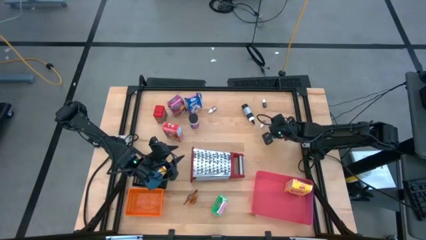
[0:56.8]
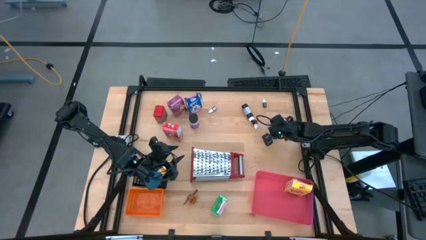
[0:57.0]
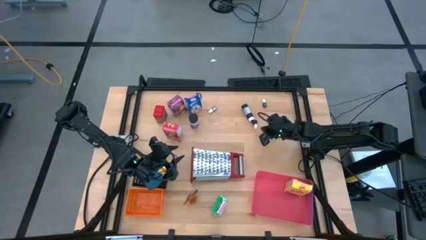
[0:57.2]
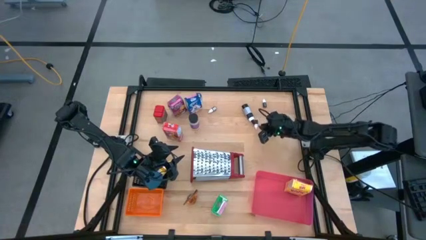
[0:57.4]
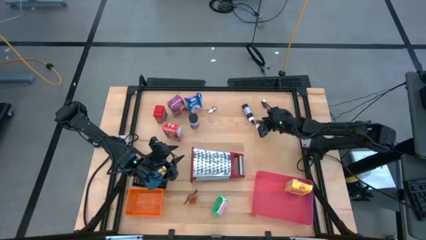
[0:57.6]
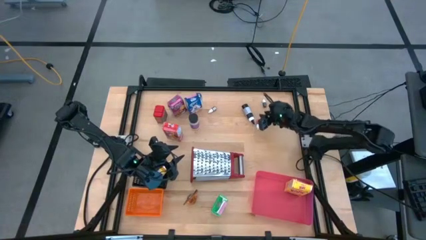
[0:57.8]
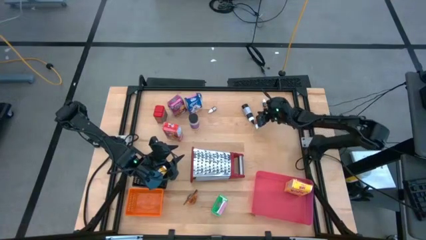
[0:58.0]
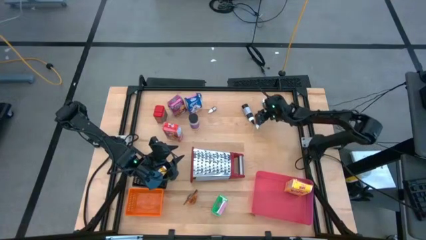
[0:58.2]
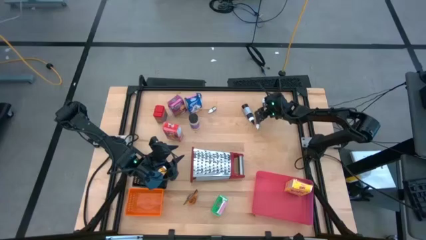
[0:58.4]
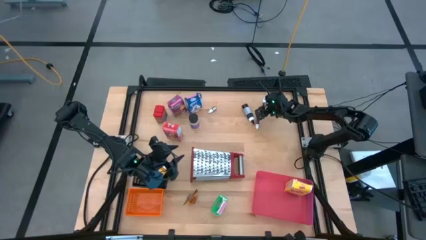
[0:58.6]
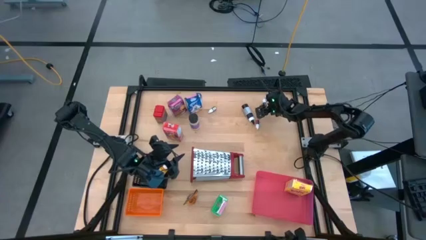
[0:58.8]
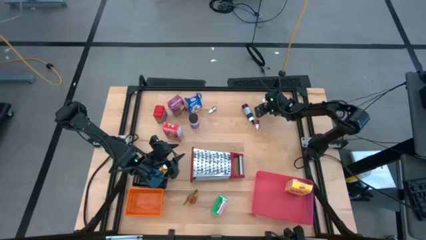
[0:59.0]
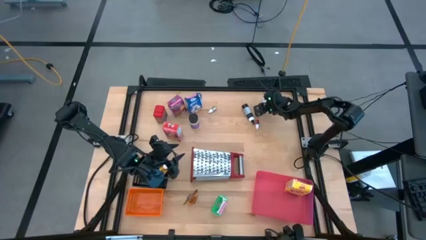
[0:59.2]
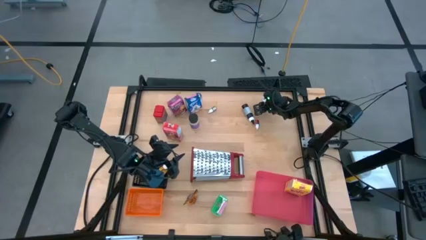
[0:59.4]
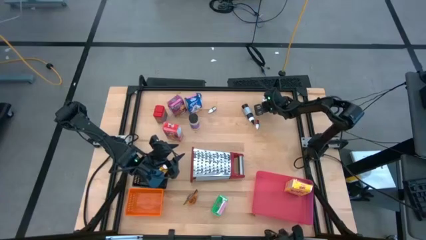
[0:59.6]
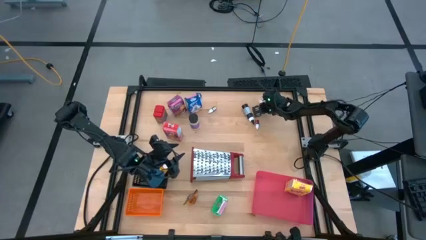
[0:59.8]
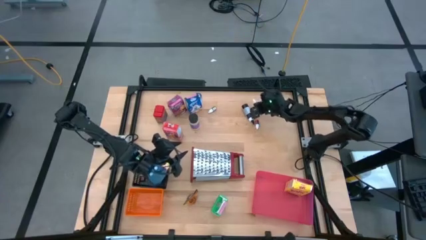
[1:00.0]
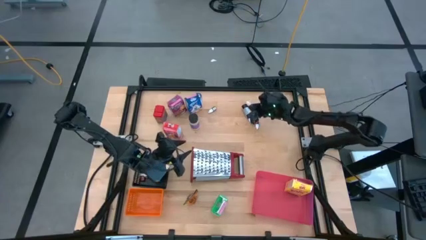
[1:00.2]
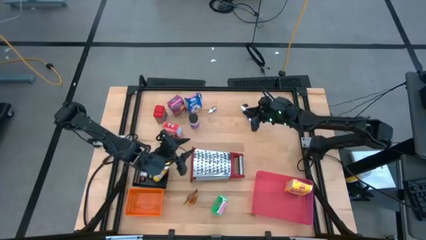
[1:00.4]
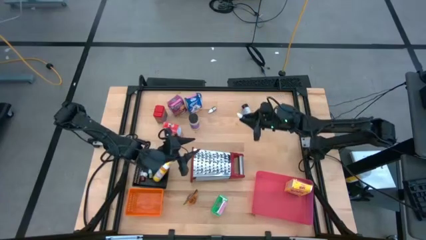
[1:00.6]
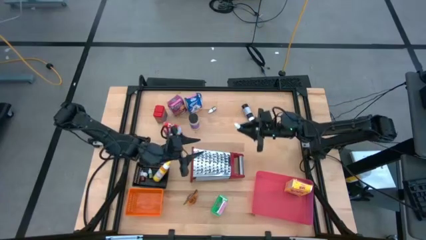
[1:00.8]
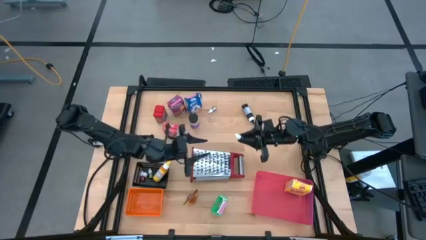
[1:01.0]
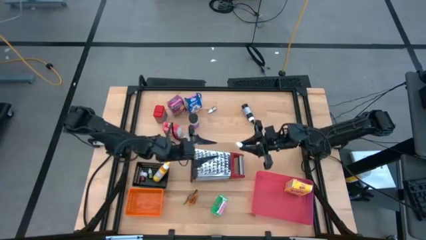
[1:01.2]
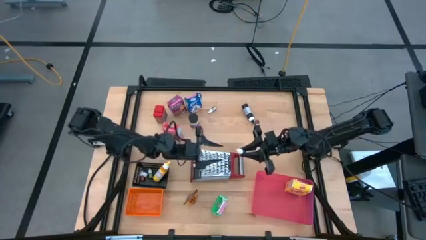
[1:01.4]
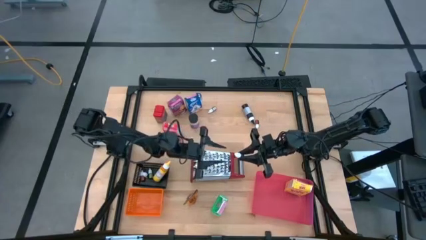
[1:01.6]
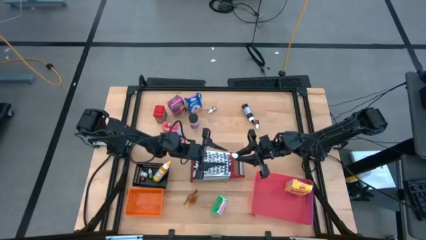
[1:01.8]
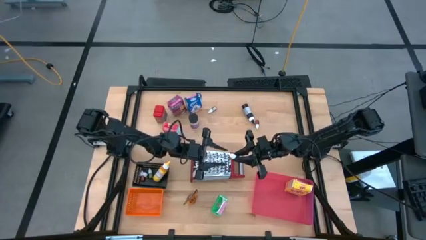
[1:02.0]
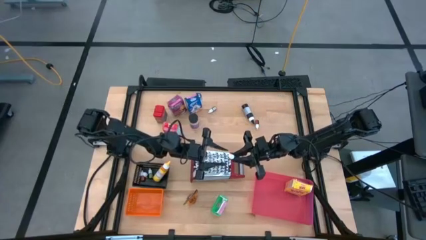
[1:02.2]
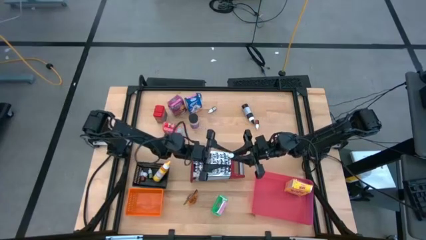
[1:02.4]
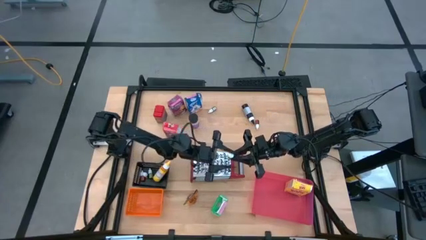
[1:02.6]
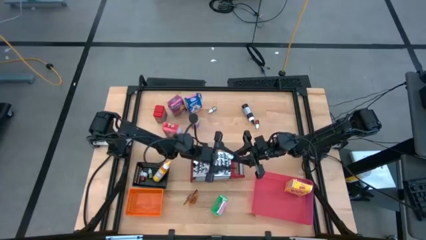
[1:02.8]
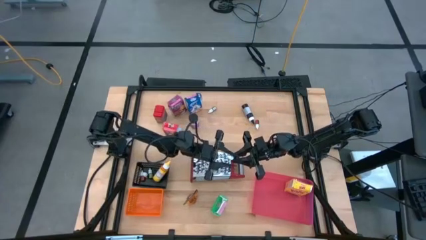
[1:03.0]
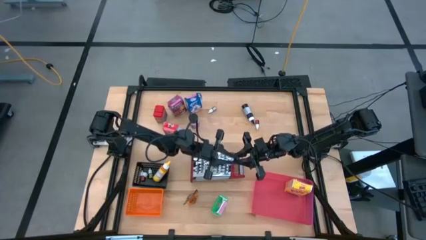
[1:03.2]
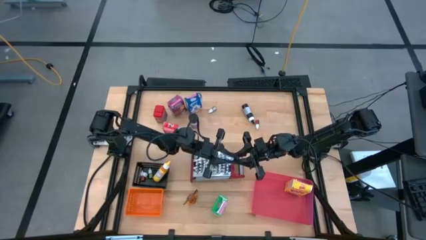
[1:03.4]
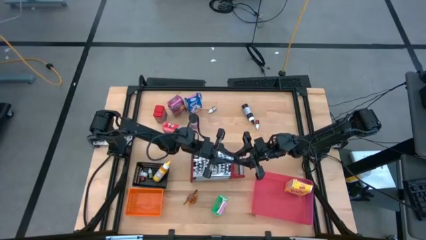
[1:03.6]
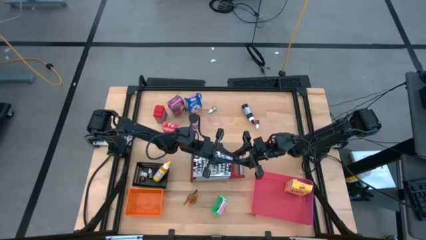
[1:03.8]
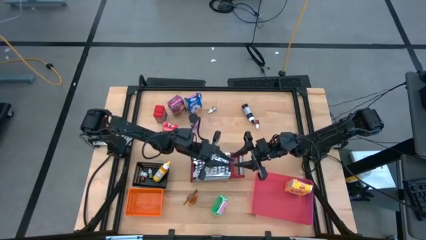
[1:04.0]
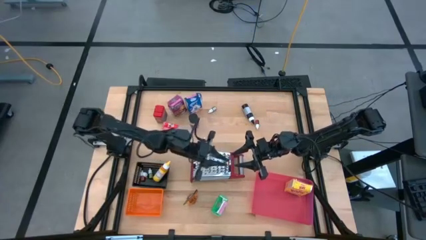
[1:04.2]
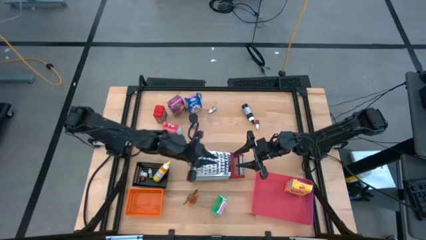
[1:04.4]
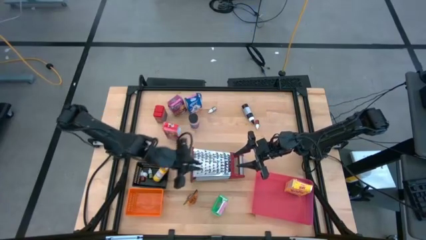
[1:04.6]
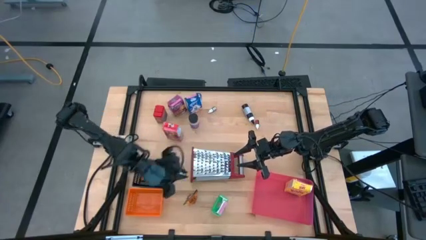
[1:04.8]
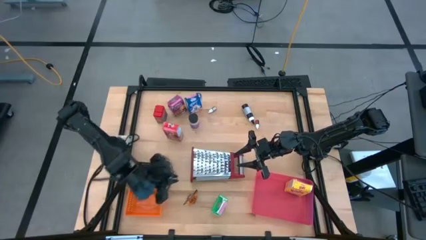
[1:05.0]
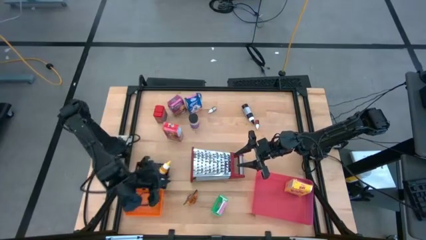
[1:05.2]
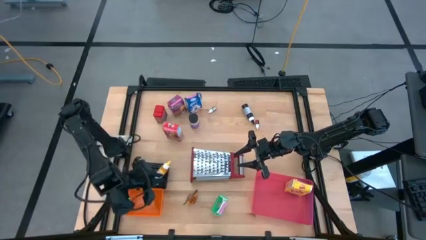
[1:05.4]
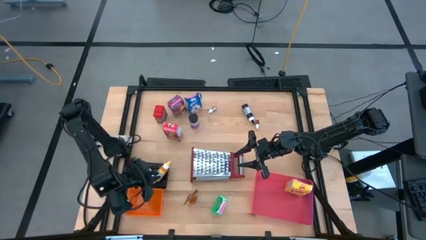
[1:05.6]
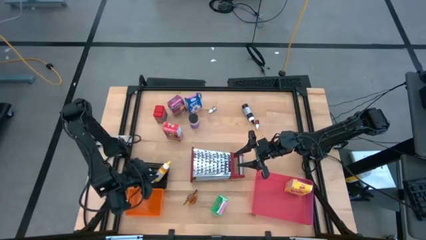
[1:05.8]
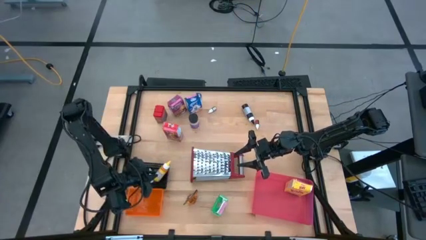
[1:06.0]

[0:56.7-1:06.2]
Task: Pick & Place Kitchen Items
Put the small brown food coloring bottle into the black bin

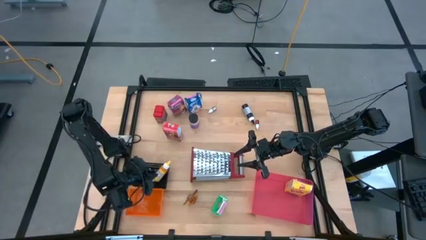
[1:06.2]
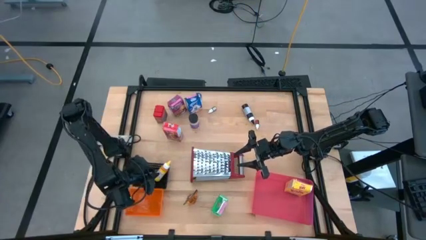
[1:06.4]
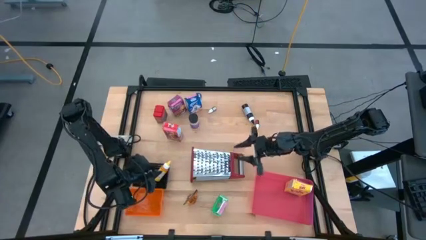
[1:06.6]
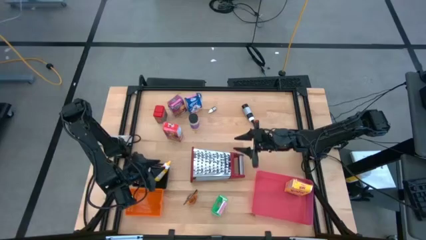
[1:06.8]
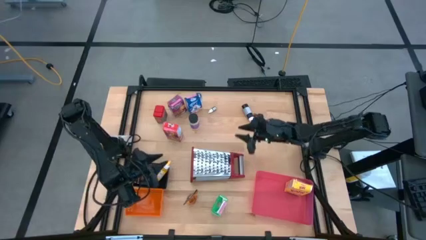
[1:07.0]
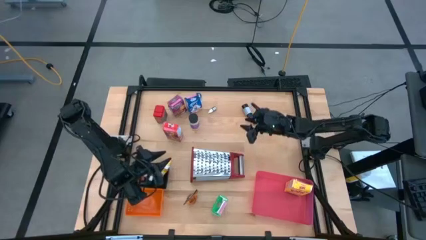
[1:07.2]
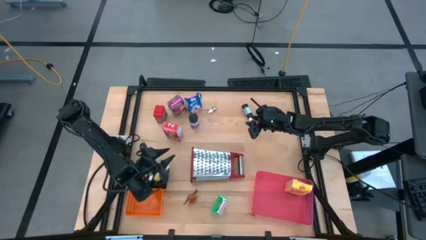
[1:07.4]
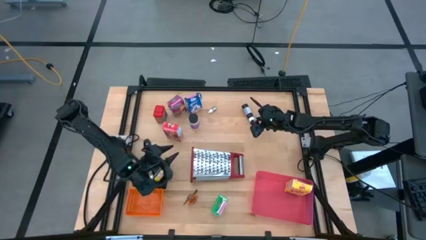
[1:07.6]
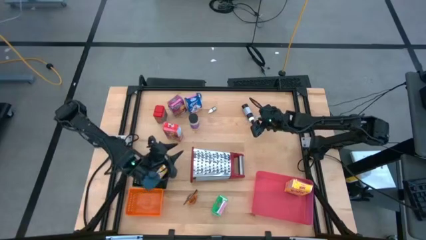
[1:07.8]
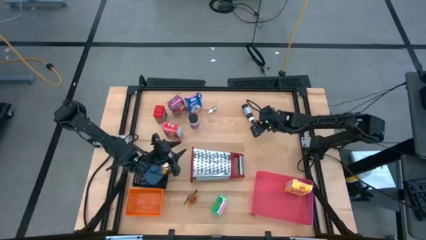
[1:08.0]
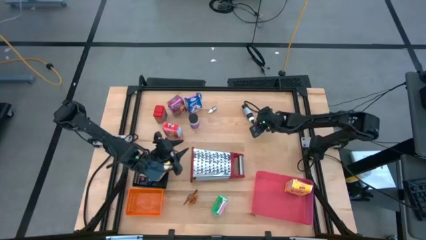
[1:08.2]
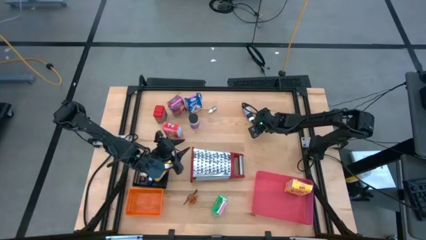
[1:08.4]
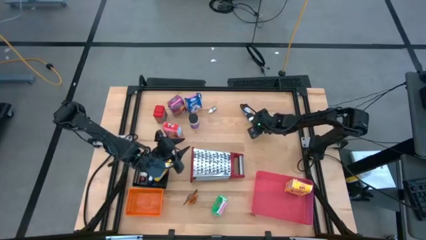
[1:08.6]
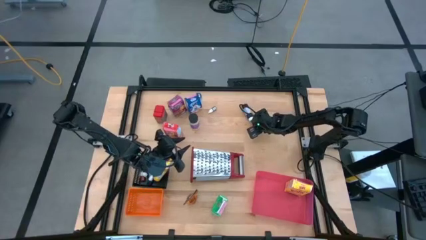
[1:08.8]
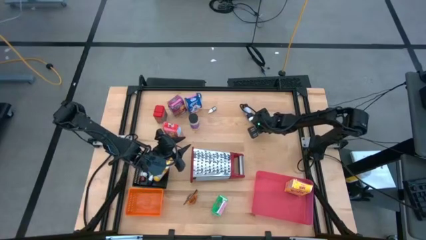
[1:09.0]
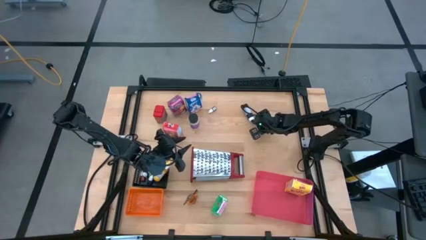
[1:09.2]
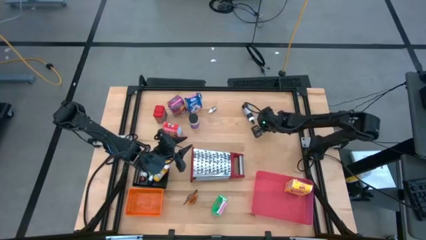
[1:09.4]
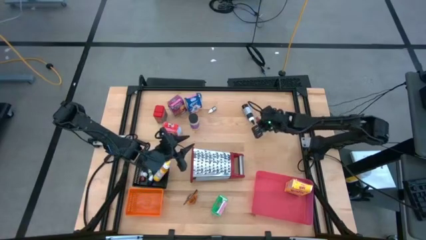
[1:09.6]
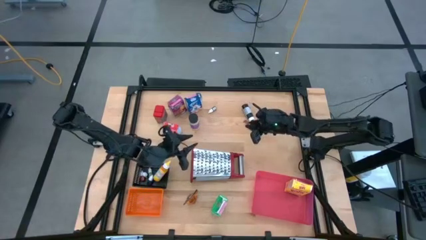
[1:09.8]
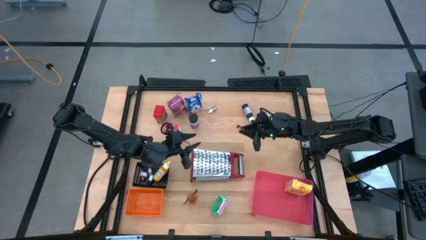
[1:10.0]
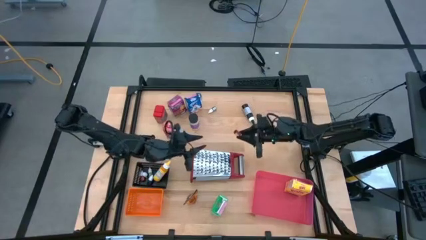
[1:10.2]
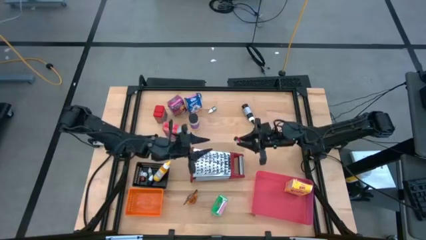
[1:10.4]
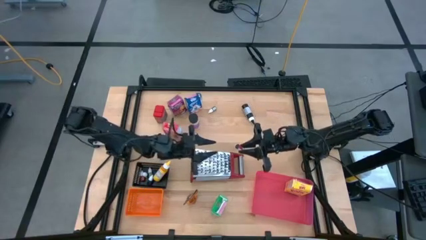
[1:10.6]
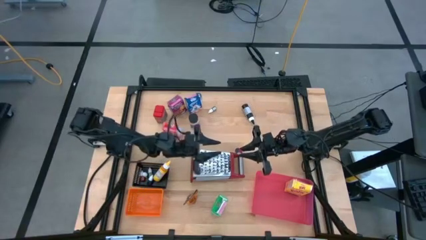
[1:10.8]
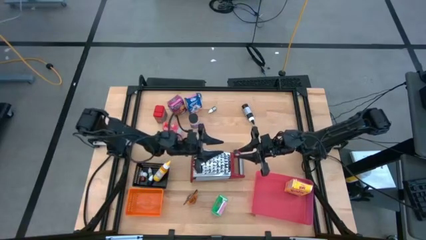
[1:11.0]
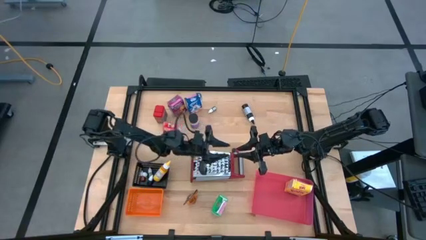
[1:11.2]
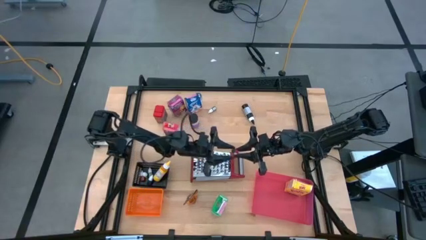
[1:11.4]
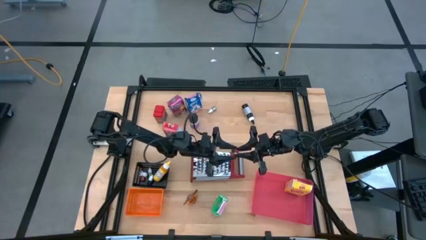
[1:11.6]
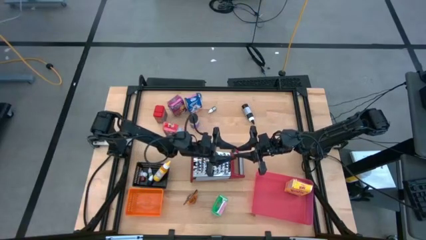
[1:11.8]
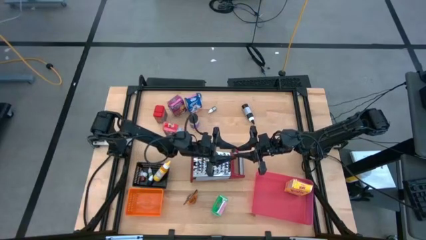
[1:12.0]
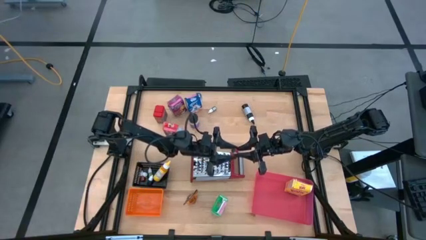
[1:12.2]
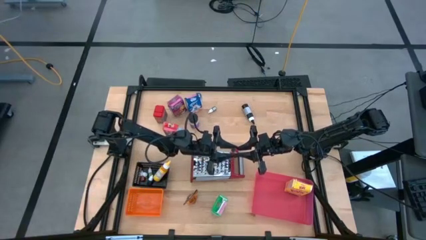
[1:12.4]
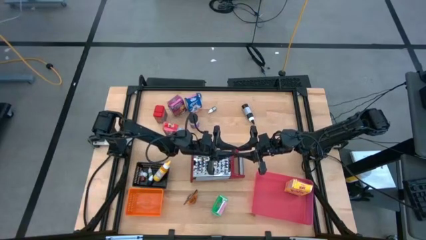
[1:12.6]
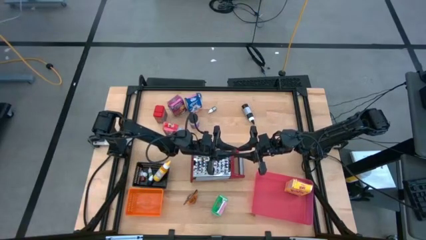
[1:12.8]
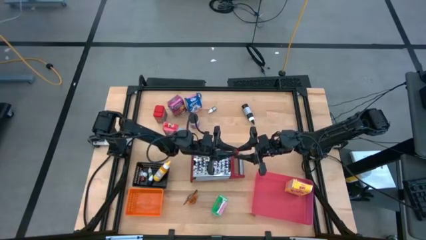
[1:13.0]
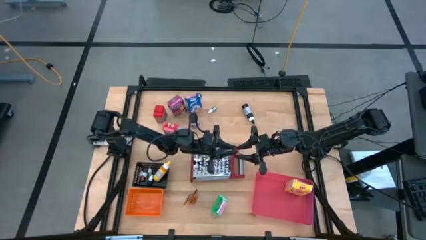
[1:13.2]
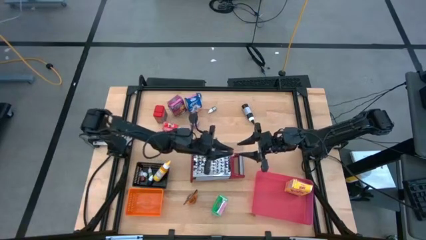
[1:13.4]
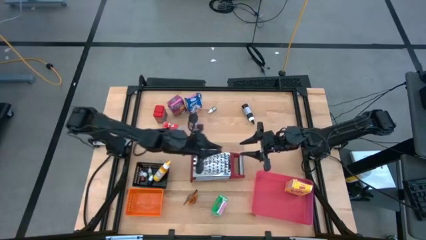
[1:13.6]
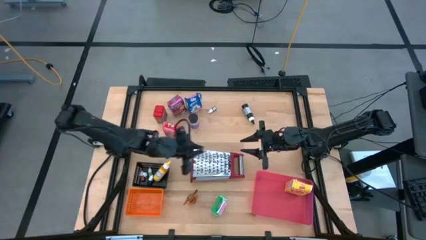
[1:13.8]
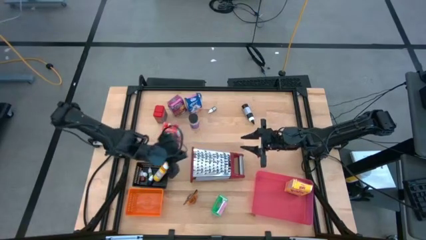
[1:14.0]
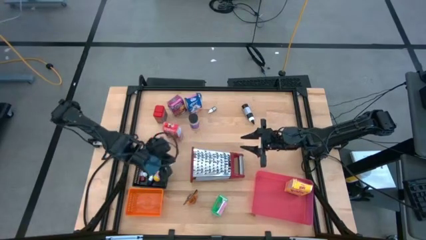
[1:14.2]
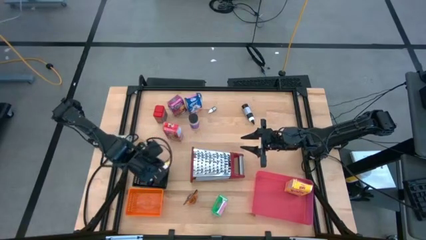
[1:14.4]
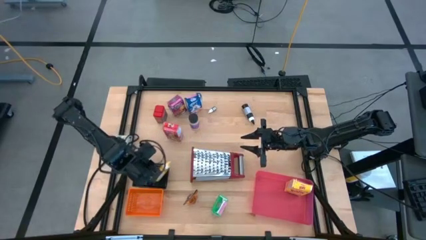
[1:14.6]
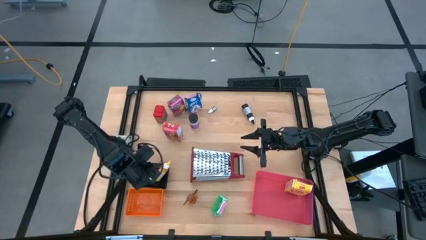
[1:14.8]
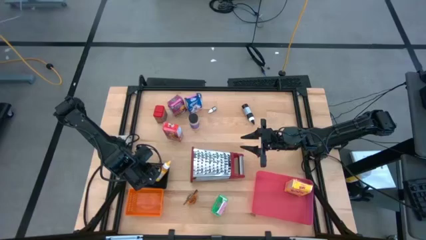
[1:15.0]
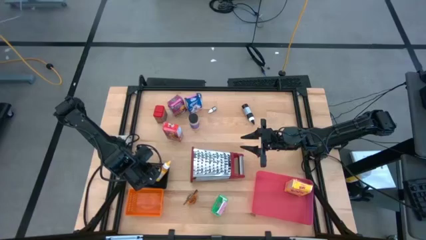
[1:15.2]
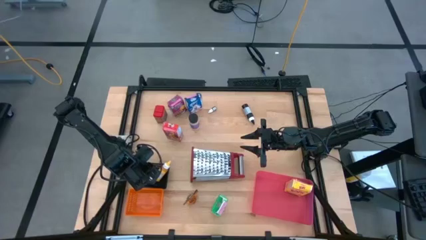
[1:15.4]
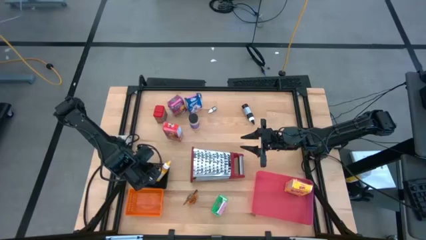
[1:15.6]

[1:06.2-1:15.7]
Put the small red food coloring bottle into the black bin
